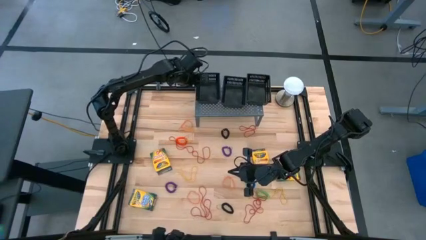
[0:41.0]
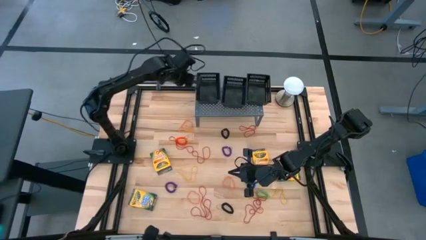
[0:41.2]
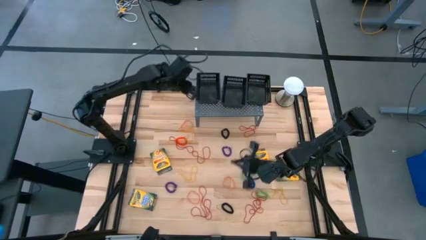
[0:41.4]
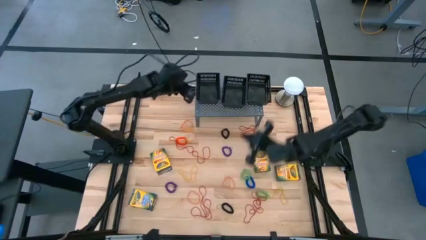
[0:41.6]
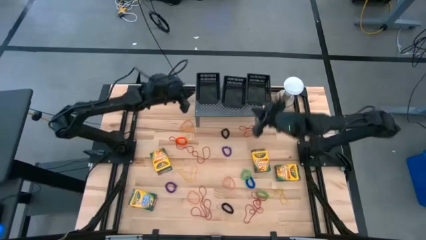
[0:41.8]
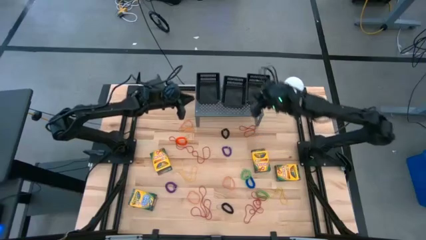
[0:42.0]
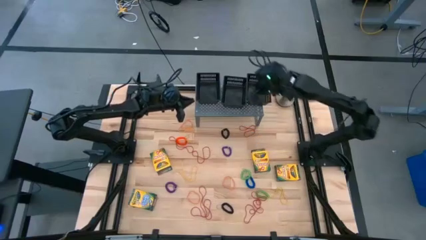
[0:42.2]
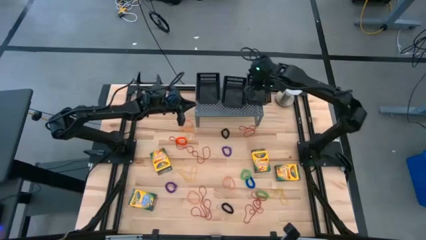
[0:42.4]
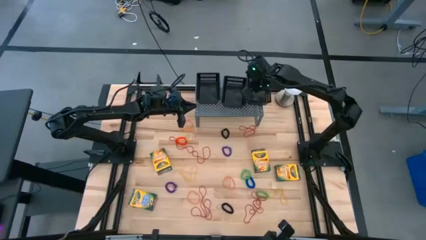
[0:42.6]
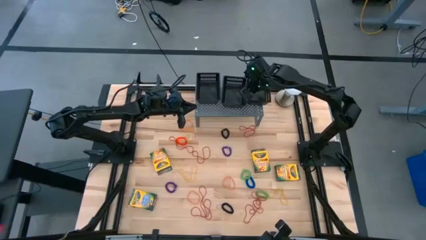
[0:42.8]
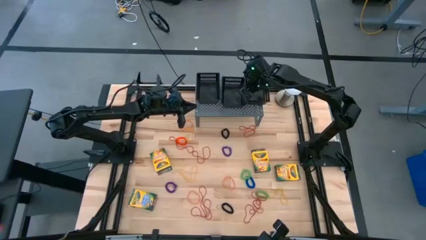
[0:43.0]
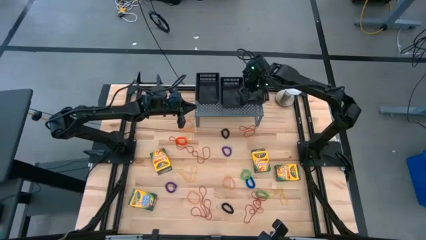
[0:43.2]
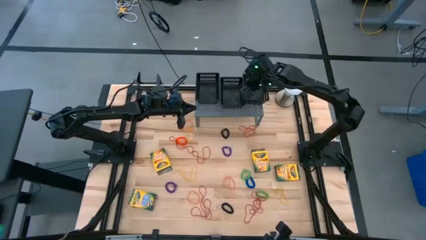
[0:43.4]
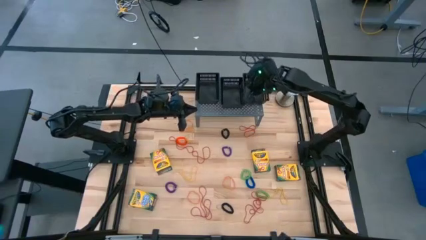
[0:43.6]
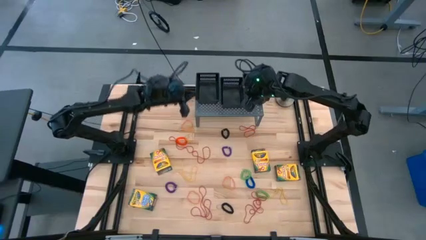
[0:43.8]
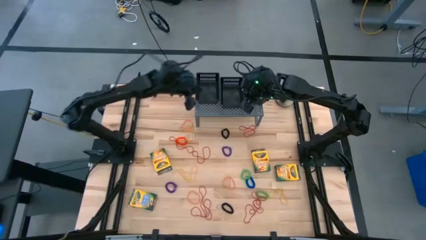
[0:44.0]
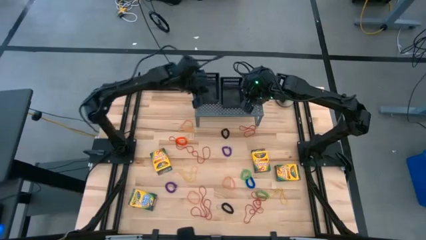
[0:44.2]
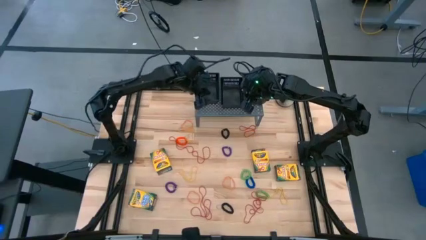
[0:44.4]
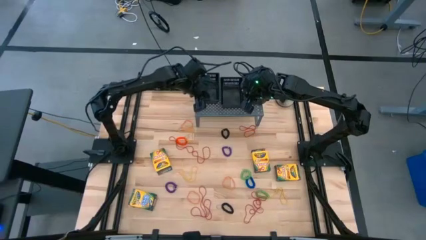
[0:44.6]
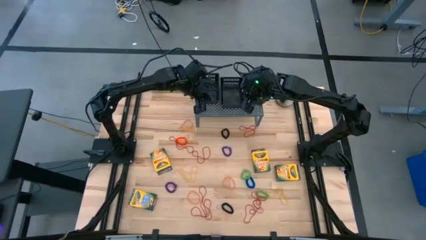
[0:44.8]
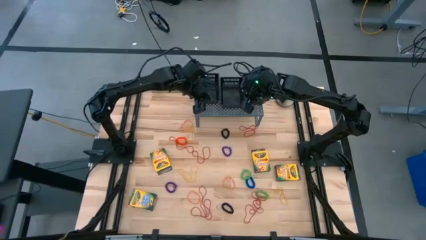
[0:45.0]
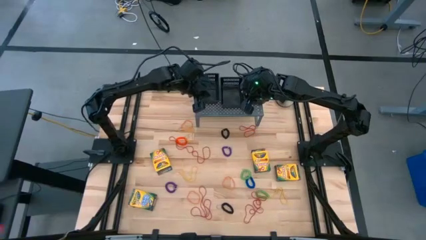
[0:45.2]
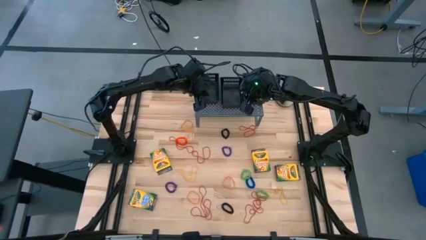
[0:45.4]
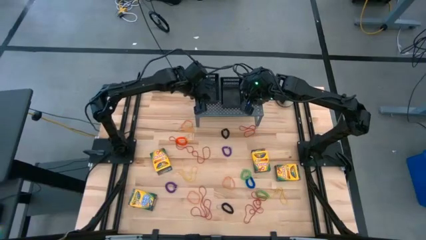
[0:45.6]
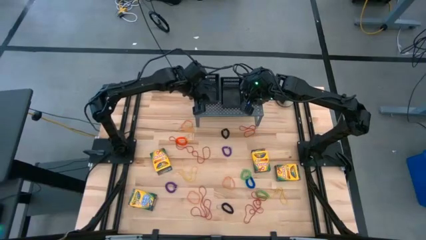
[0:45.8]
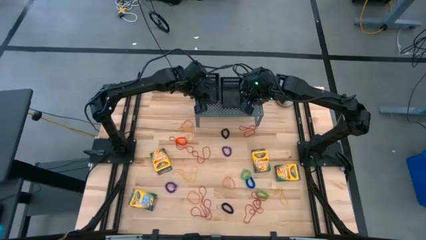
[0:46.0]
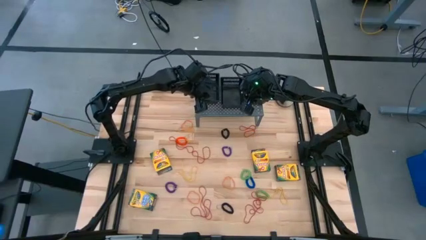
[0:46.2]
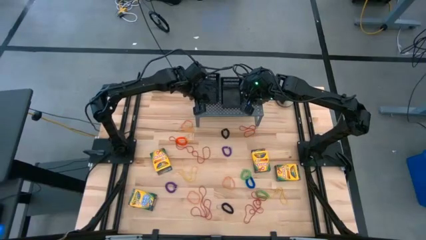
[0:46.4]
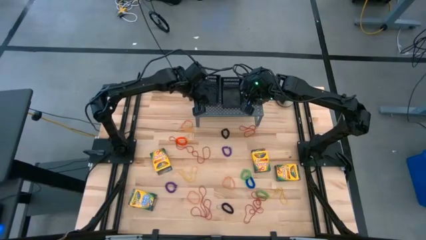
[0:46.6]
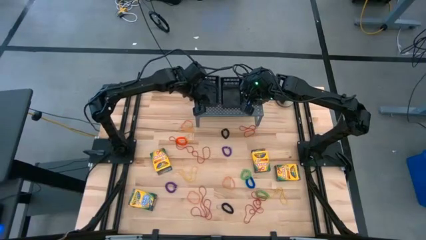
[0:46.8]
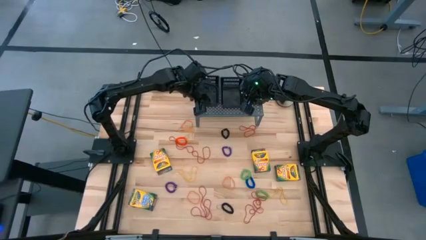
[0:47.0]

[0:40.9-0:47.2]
Task: Sort rubber bands into baskets
Adjust the black basket in the shelf

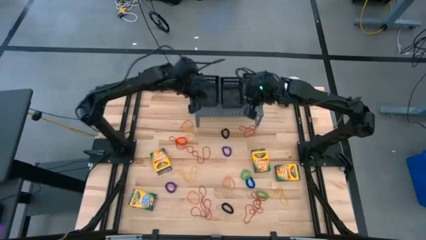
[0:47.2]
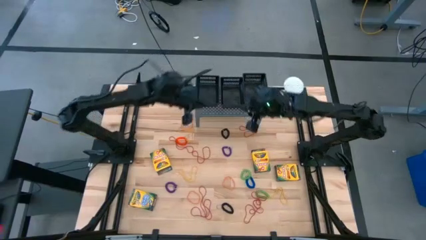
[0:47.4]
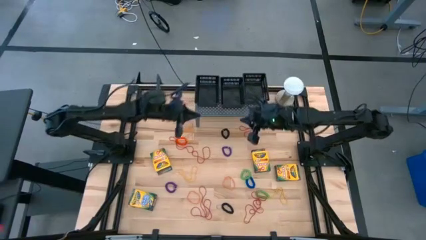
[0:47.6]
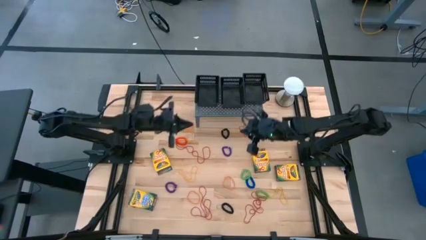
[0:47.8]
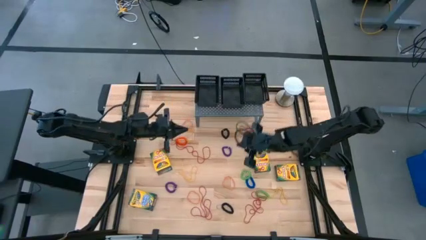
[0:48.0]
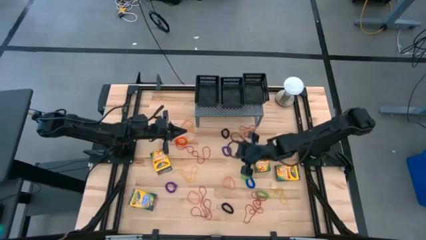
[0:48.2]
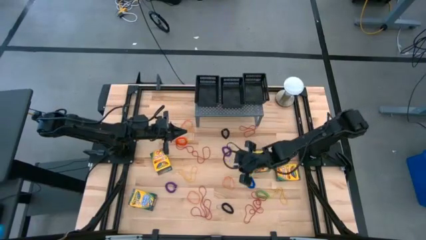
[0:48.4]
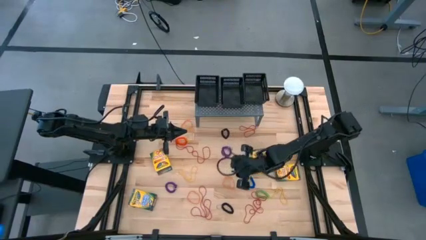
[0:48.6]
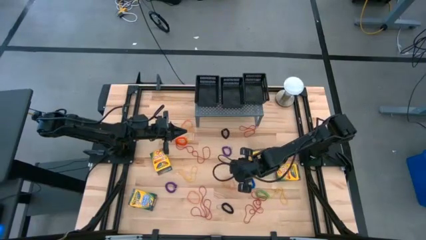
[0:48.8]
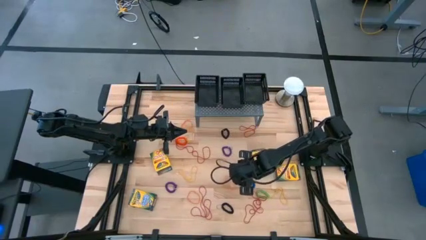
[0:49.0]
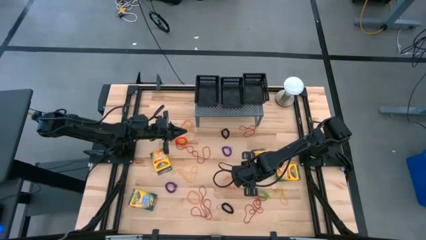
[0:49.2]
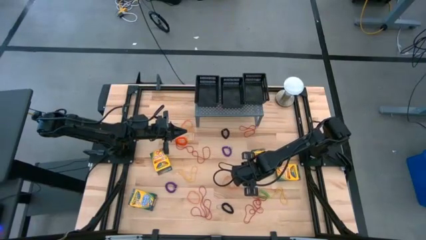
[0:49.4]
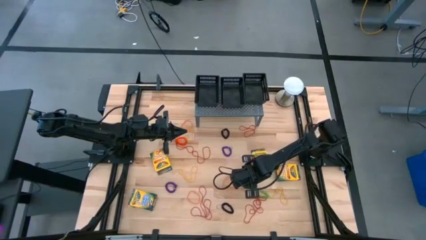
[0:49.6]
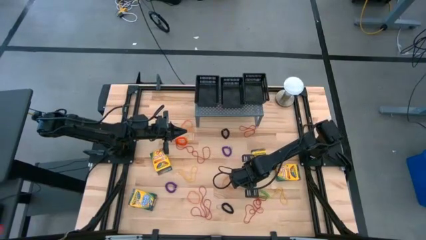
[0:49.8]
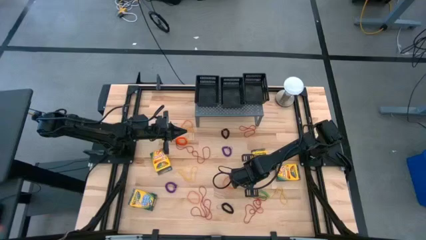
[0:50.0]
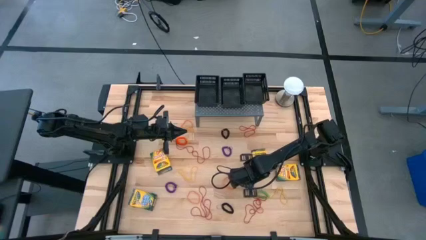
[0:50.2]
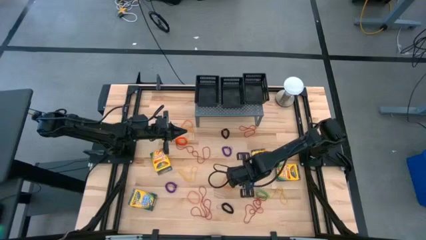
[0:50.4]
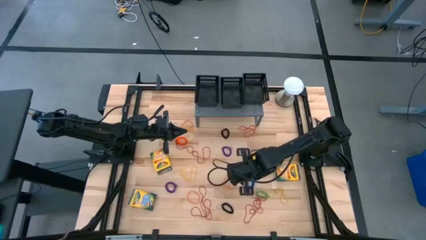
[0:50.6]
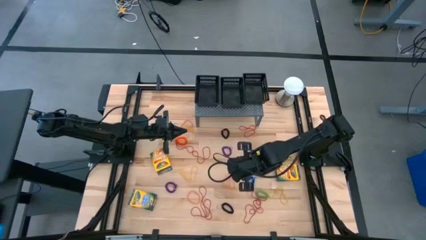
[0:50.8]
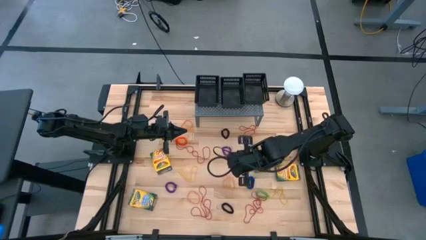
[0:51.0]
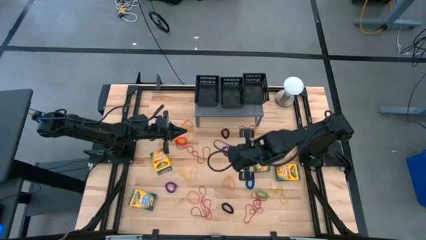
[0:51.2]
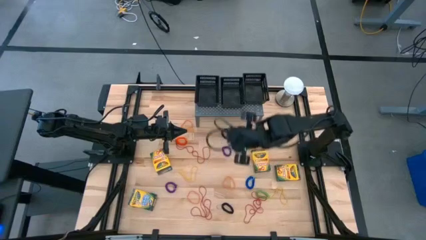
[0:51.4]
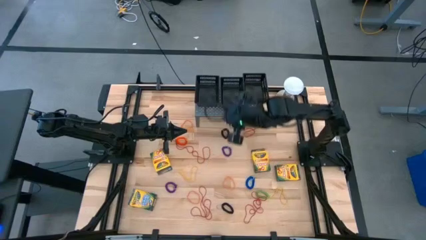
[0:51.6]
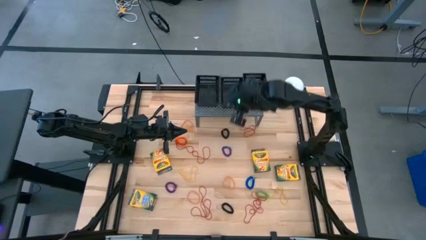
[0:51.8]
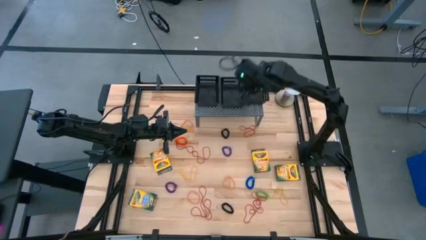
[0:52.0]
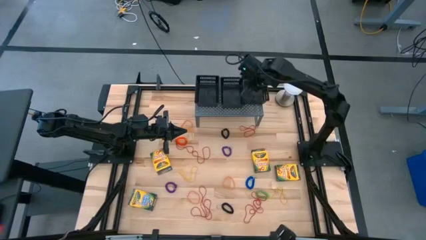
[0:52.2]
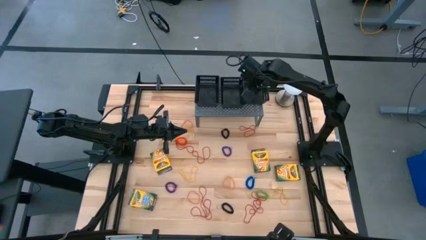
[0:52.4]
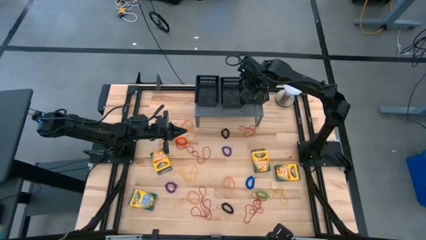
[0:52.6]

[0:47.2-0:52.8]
Put the green spring rubberband into the right black black basket on the shelf

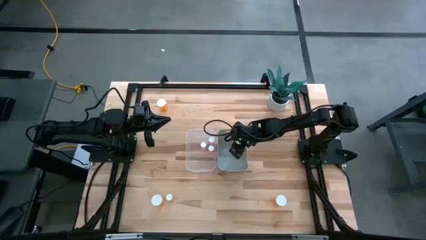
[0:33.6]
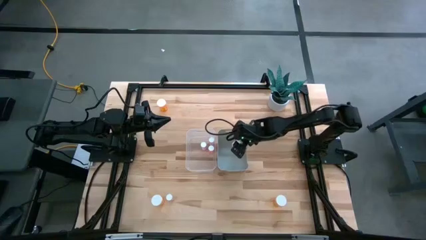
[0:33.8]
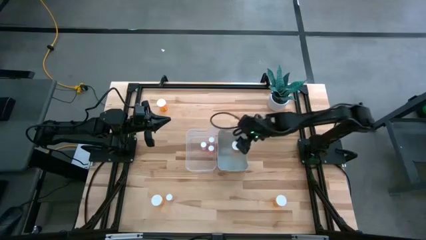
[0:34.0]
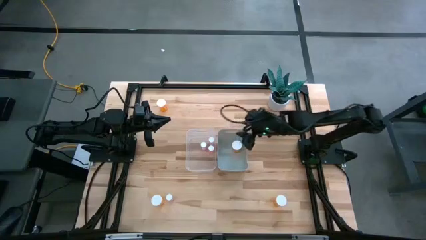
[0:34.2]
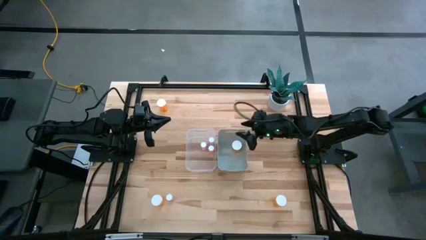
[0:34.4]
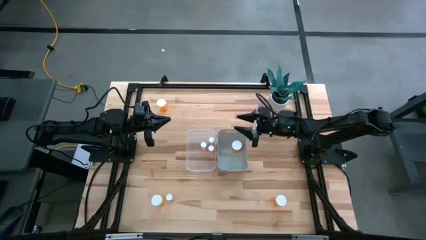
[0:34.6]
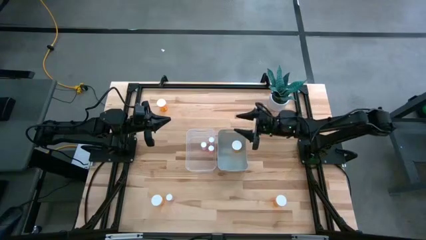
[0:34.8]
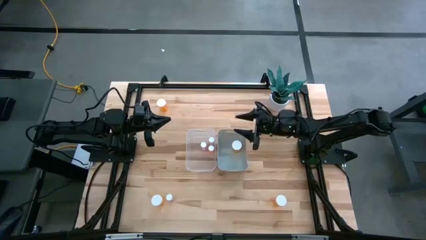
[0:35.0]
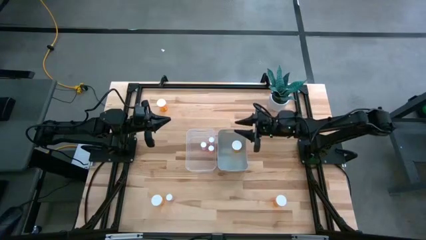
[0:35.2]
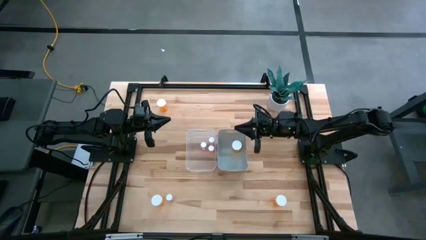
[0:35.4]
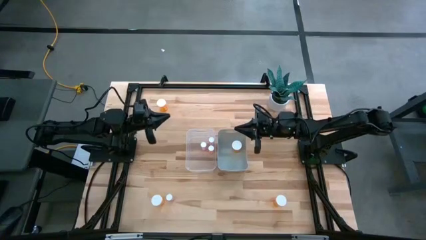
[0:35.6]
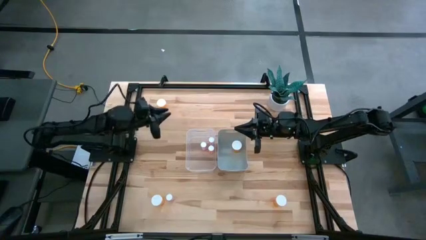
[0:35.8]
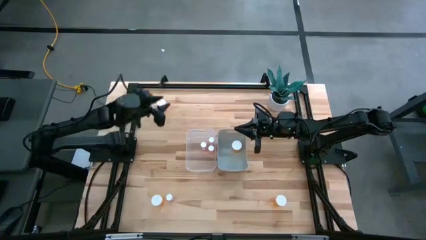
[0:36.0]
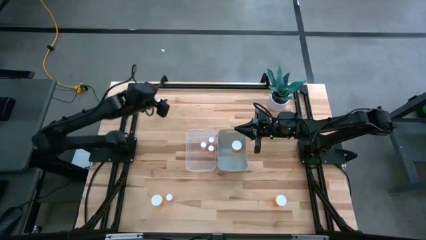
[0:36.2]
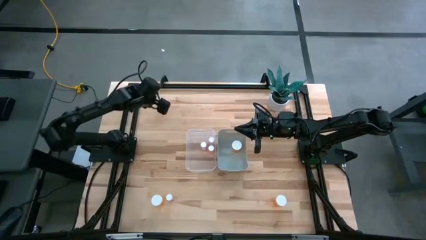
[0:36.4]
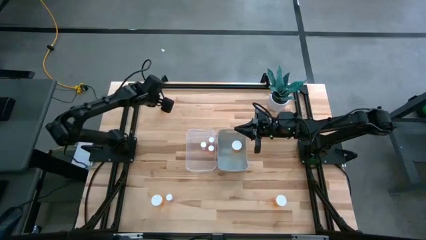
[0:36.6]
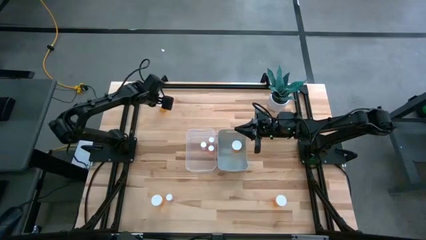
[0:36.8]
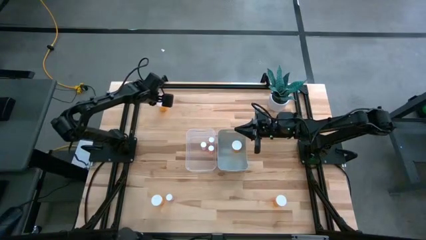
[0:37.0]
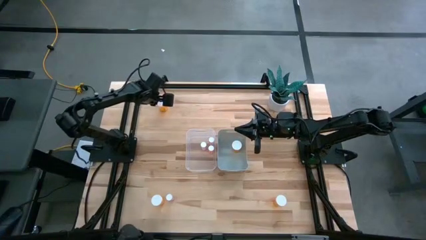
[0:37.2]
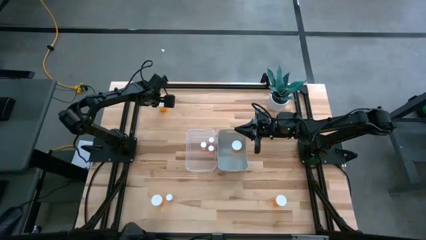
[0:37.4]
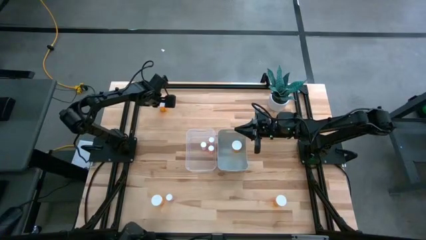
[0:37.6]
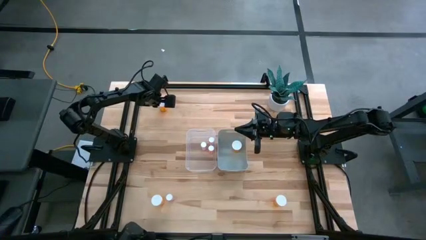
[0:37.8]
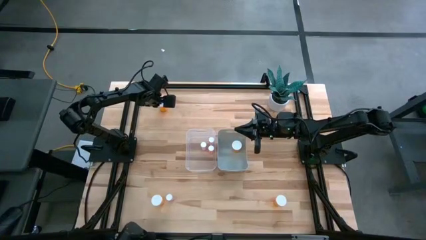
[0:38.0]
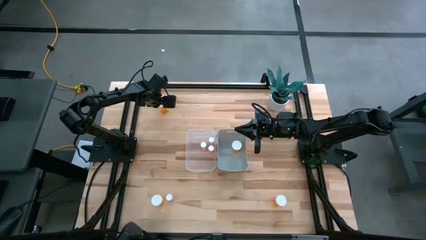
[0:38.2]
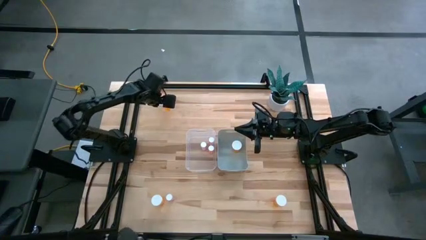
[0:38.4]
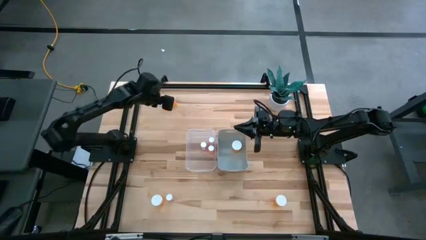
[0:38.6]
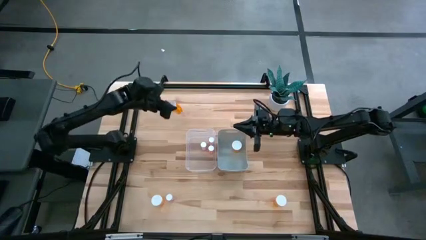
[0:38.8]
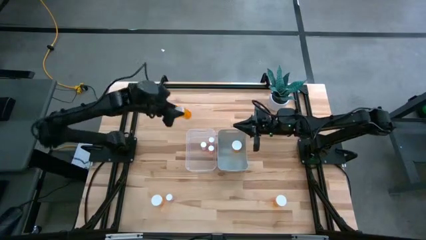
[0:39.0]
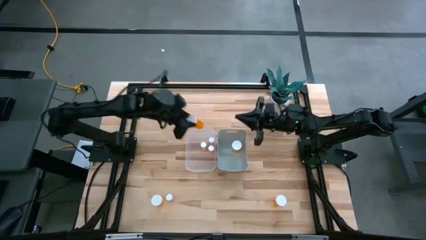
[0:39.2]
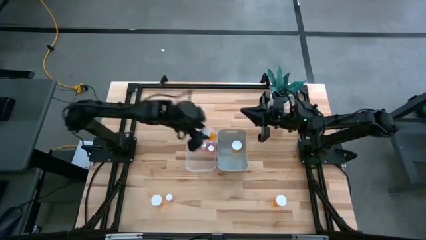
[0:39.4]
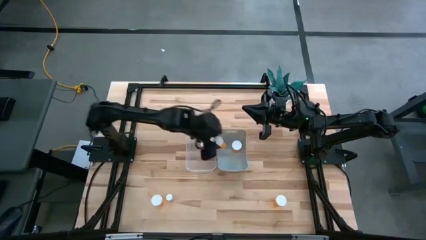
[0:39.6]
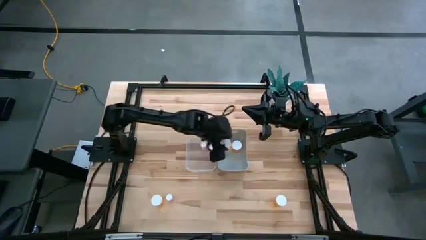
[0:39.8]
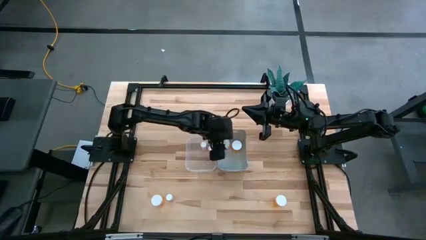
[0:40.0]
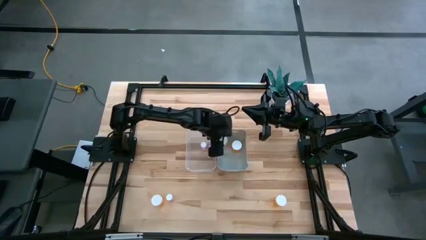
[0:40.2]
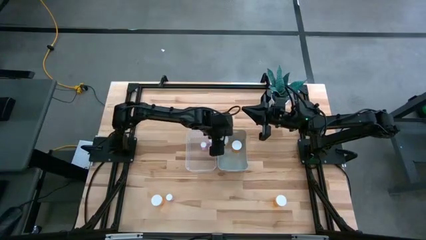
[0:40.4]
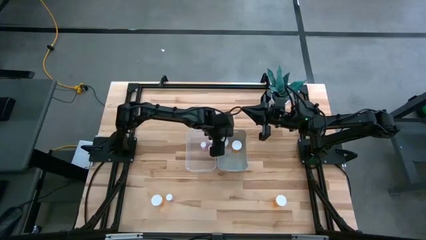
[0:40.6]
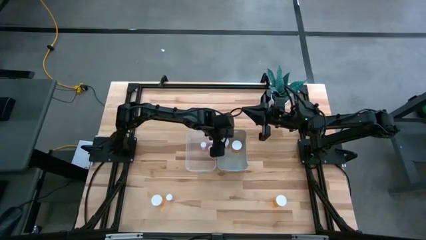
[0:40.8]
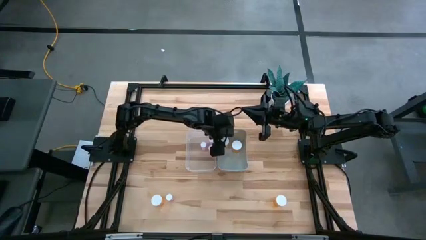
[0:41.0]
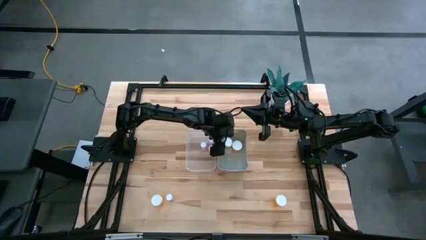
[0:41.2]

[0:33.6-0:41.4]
Task: Pick and place medicine bottles into bin by pill shape (circle, oval)
Put the large orange pill bottle into the gray bin
